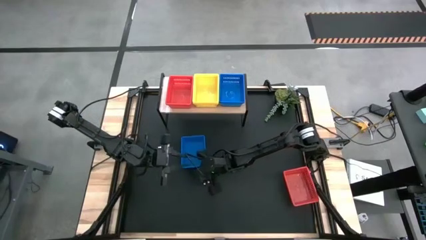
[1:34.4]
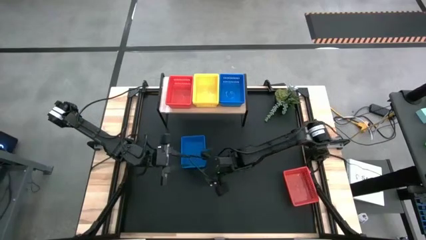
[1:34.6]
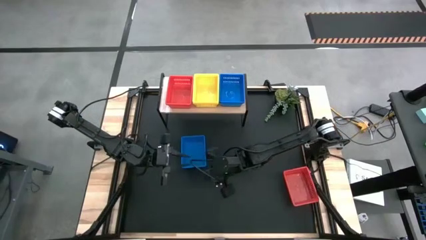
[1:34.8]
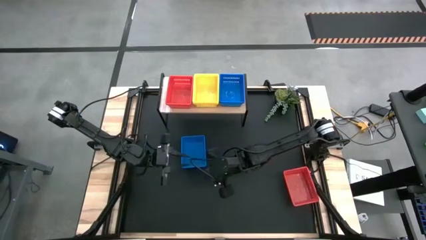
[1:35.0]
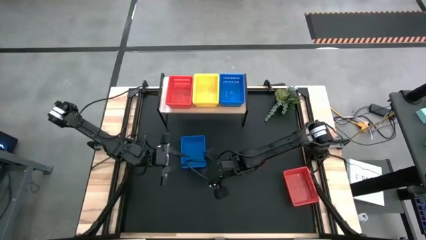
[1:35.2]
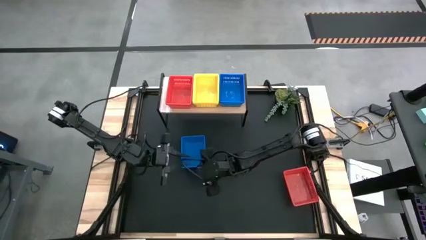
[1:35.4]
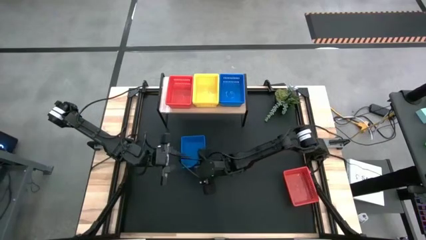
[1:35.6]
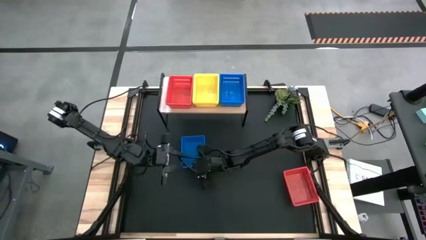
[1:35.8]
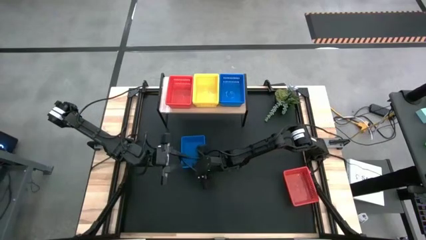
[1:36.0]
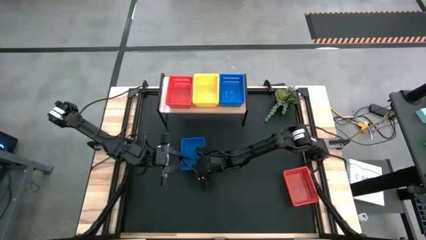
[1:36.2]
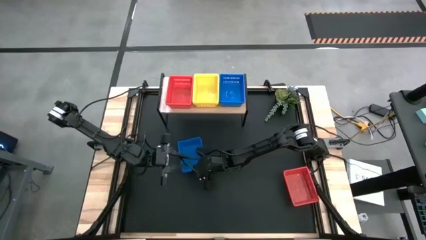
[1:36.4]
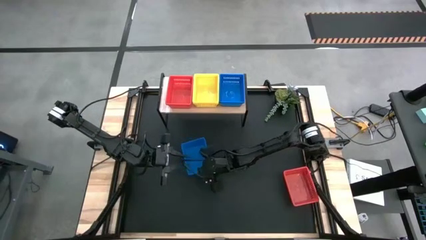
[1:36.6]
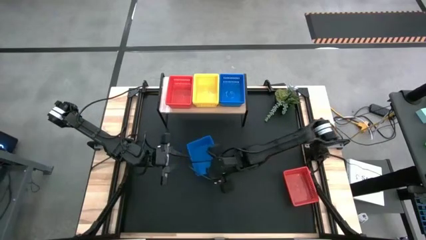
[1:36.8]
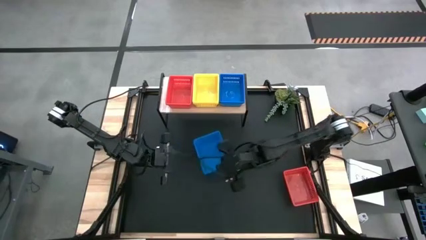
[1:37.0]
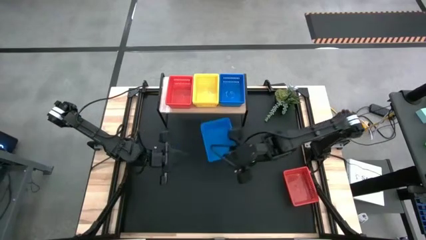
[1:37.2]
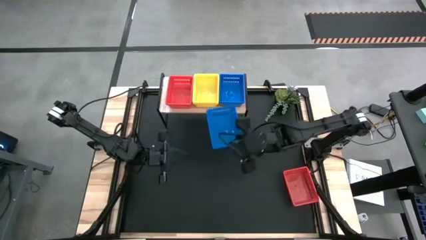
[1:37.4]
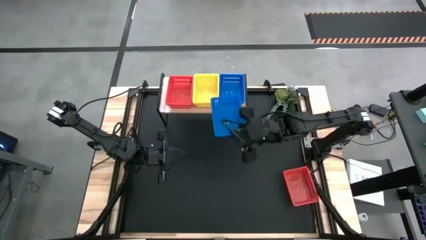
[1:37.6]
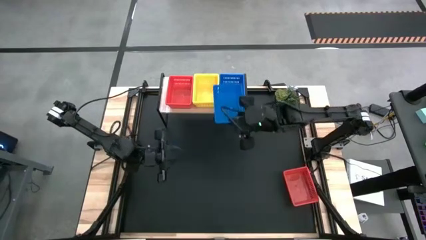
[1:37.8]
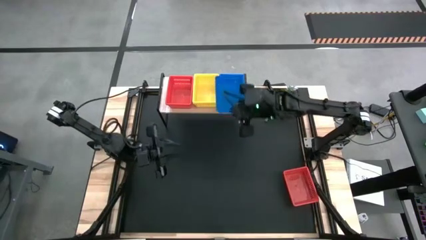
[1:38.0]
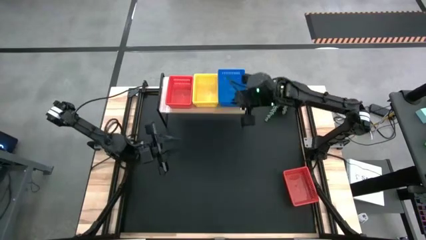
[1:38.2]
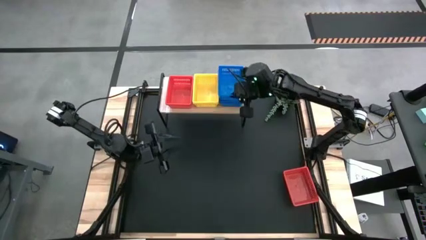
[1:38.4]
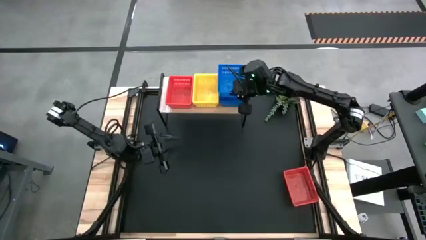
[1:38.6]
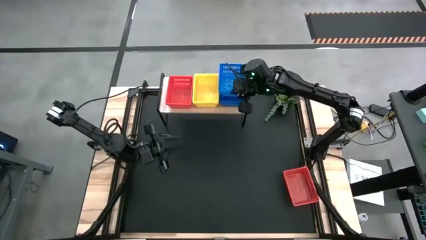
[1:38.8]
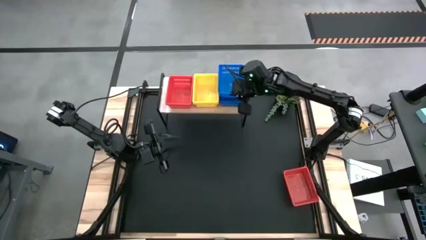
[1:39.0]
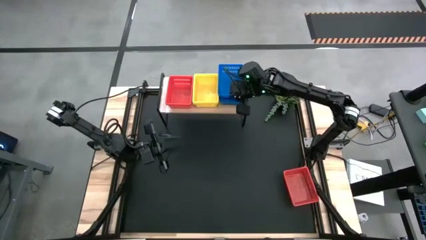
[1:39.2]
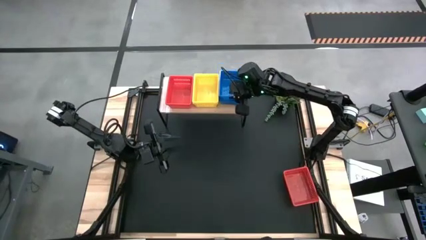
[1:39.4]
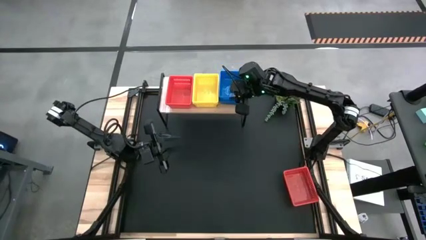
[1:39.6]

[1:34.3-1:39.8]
Task: Stack baskets on shelf by color
Stack the blue bin on top of the blue bin on the shelf

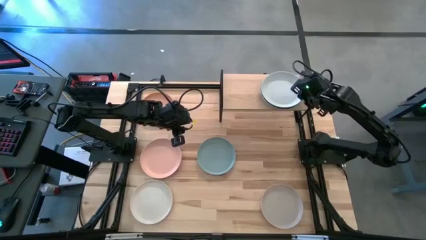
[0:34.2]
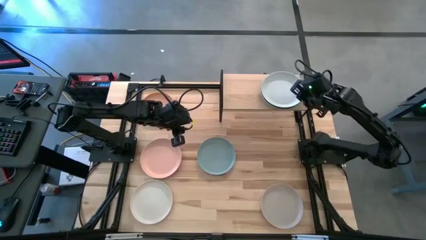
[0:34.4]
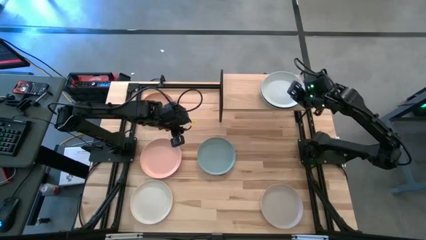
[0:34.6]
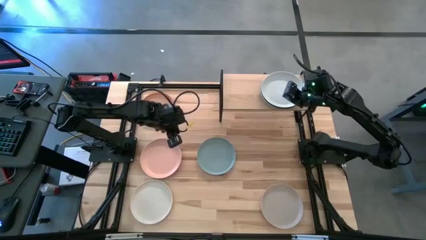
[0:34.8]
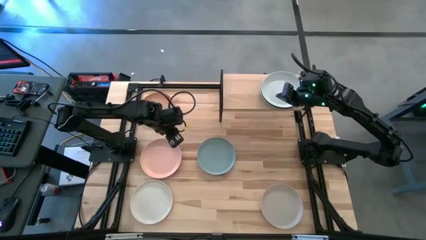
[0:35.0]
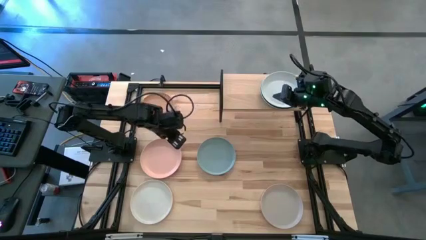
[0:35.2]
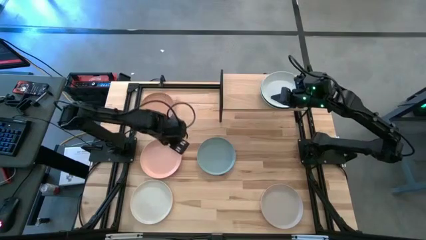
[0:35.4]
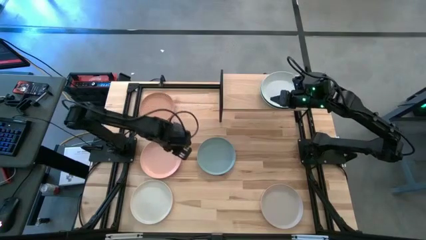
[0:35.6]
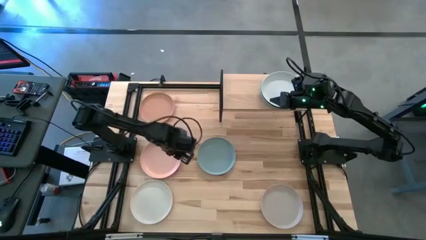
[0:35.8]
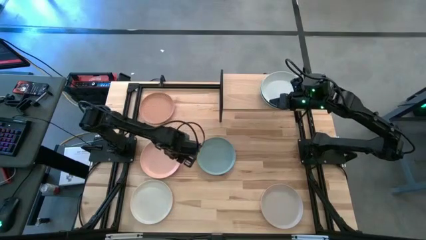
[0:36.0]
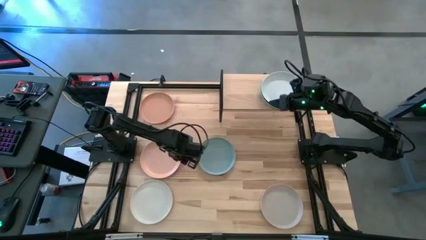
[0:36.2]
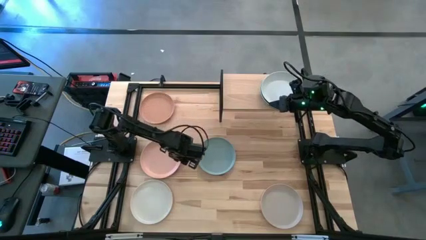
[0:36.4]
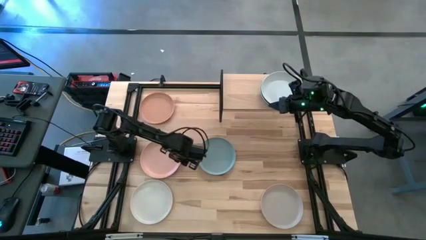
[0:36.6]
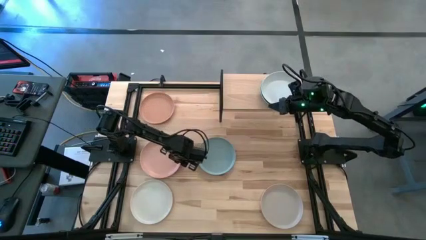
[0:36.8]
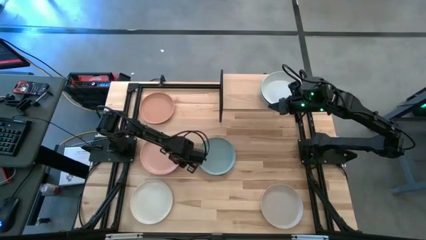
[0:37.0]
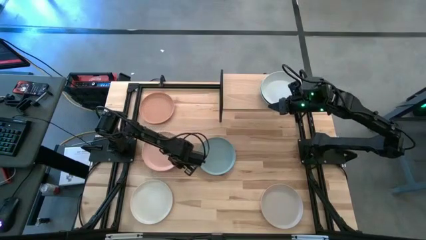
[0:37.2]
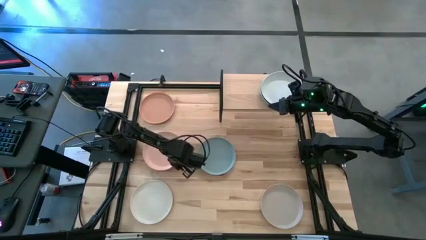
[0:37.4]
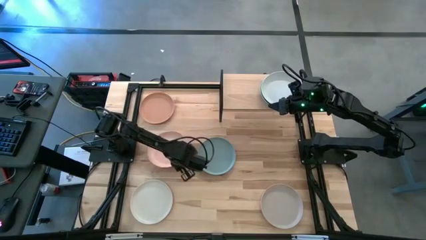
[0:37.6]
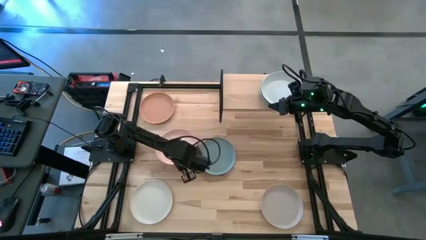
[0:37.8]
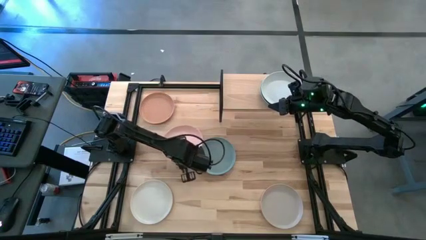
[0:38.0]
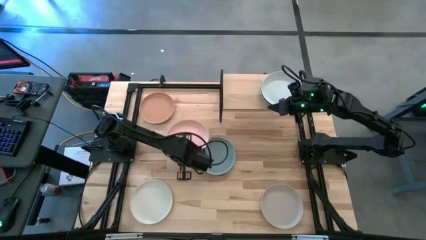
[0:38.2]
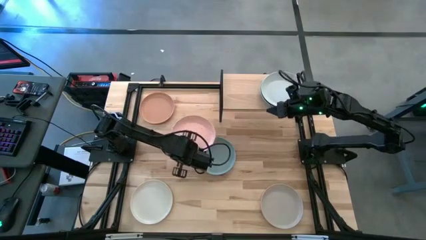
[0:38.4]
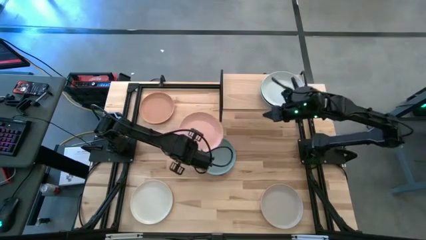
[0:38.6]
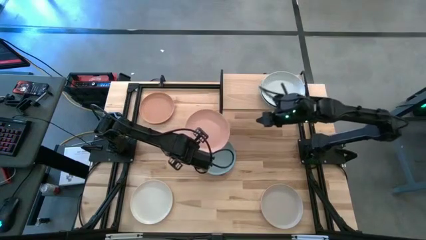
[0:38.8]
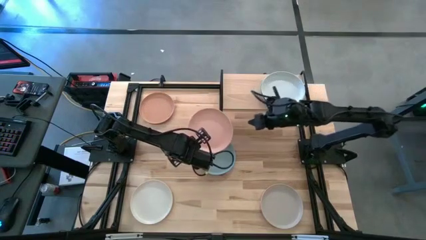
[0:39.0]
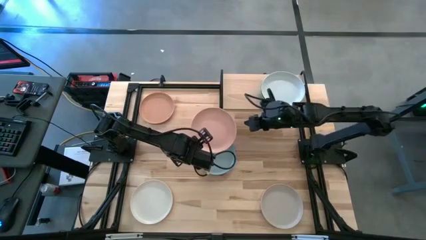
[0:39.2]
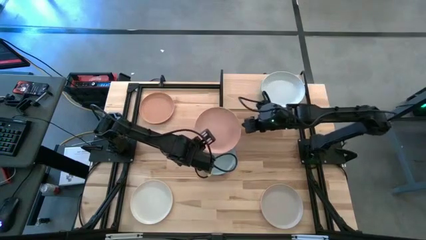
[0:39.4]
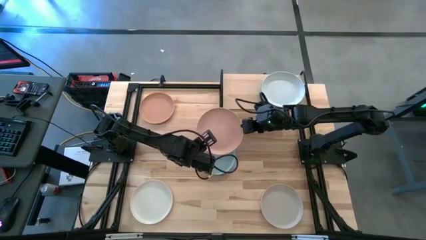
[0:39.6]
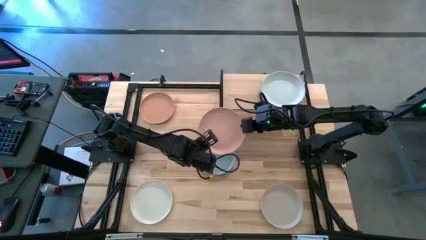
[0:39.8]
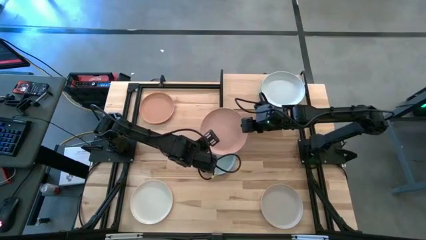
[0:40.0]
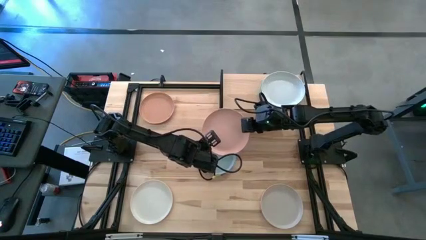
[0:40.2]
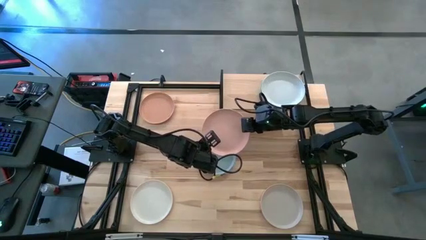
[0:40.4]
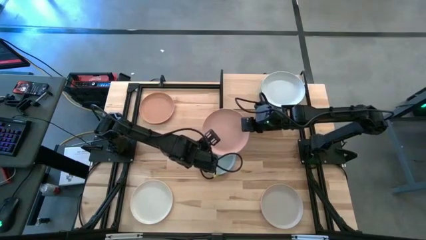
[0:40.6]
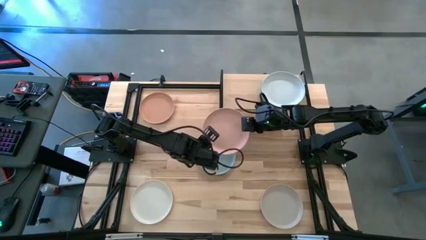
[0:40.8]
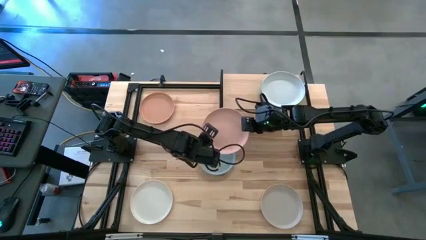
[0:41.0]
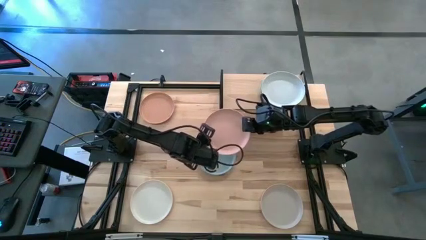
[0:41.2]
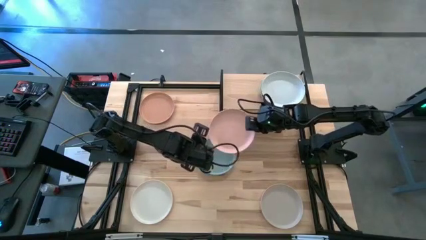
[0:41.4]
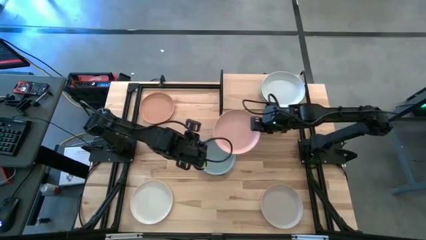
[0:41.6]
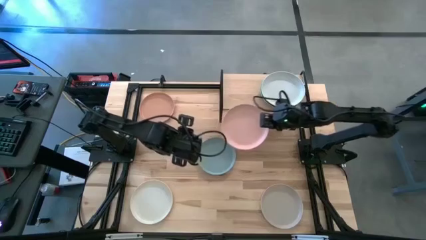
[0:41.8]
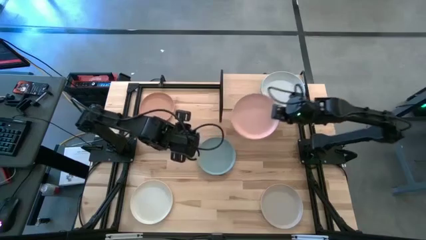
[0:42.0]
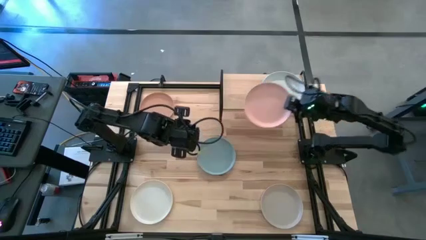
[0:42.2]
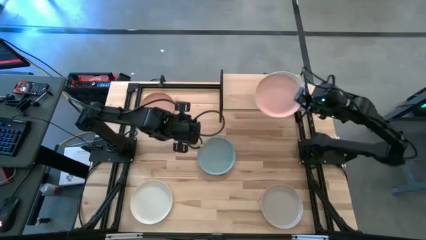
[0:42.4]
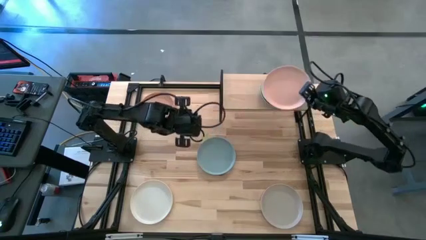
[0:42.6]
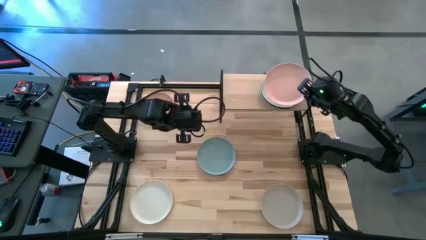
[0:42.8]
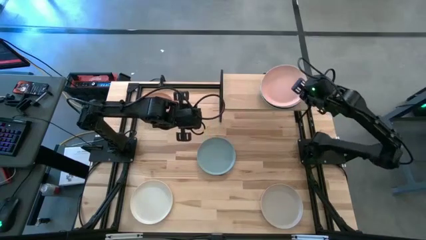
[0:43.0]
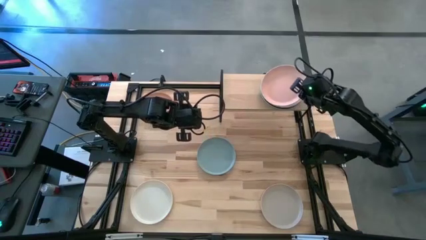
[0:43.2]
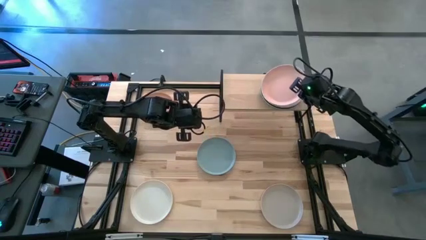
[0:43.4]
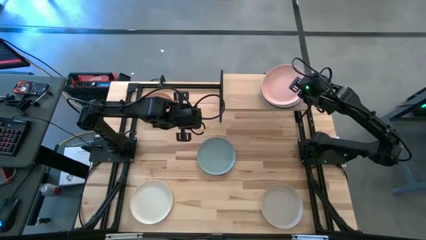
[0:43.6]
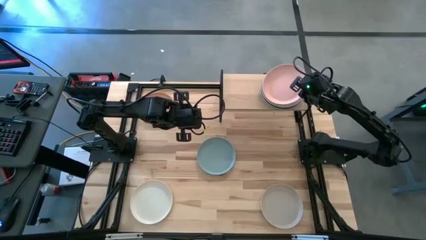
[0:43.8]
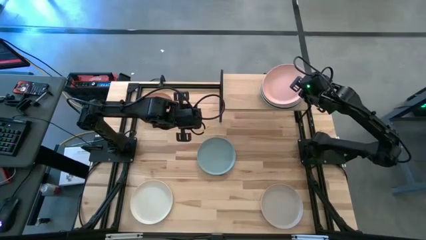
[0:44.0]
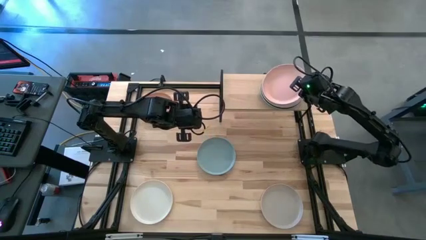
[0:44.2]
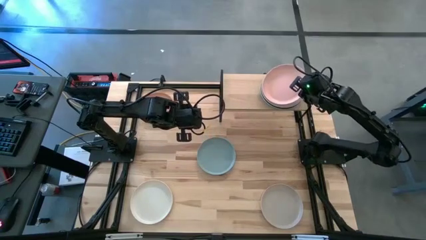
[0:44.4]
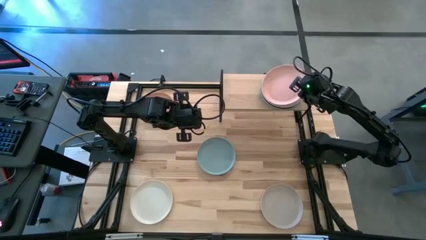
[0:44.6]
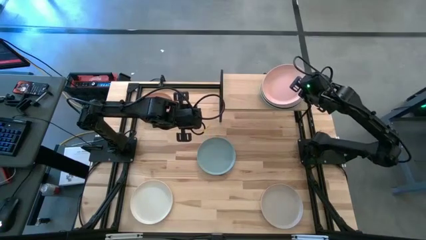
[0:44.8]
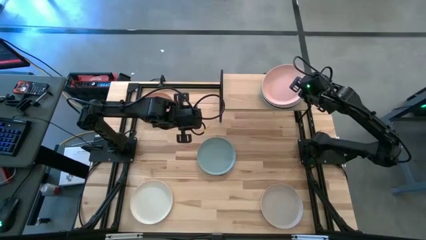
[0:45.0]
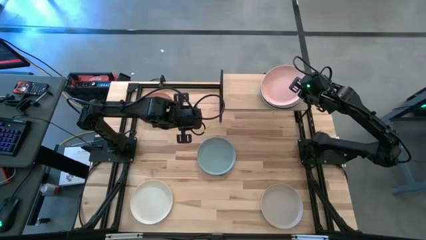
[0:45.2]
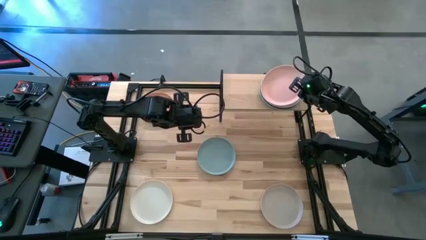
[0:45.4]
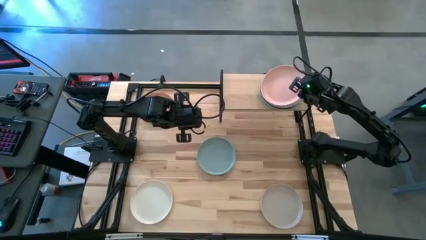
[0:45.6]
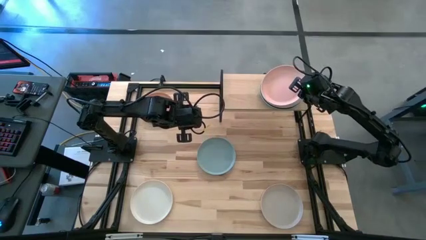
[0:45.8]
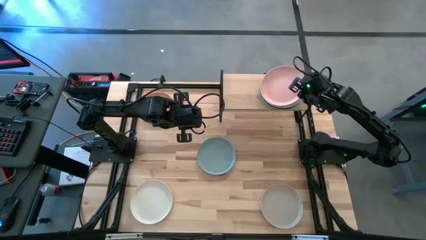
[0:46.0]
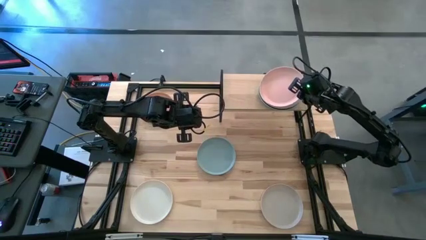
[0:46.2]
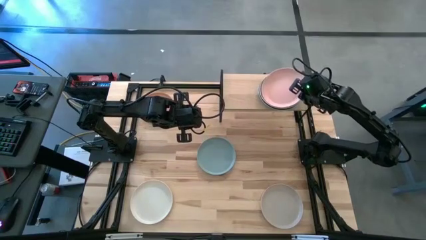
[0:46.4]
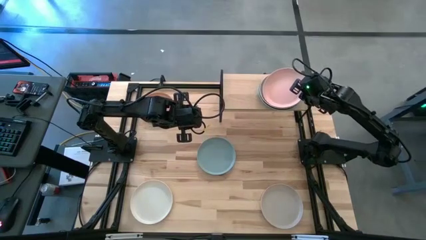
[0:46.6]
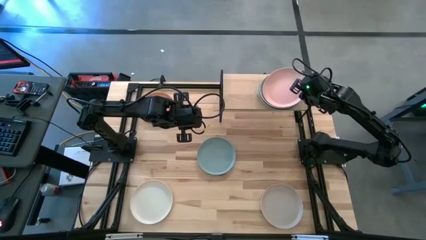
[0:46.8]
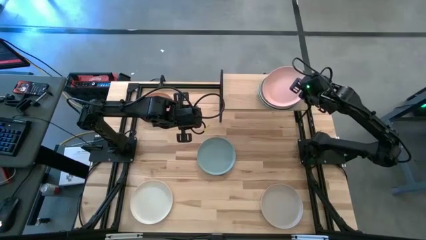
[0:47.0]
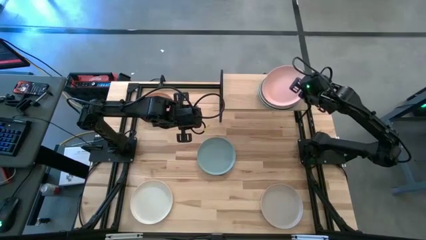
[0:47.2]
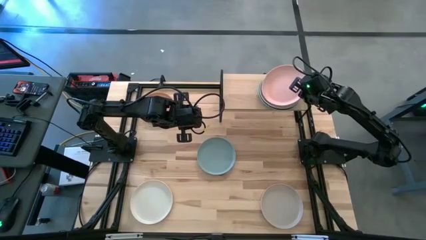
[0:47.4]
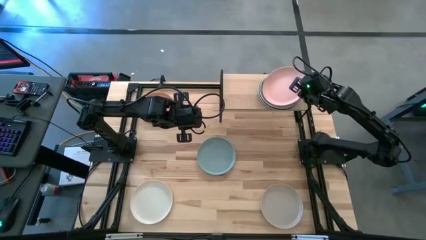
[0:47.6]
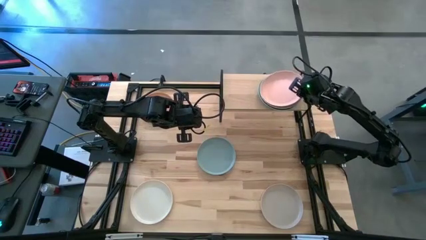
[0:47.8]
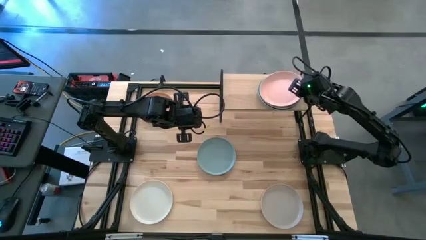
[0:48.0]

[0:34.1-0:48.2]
Task: Place and stack plates onto a shelf
Stack the light orange plate on top of the white stacked plates on the shelf
